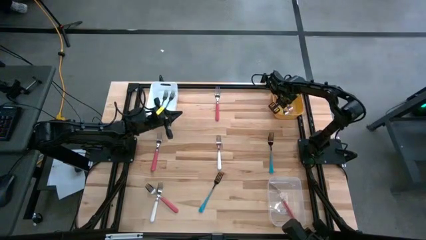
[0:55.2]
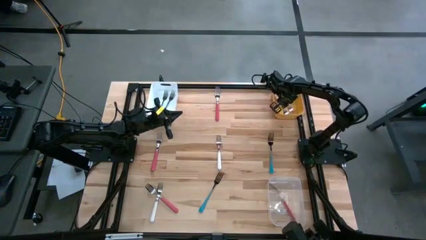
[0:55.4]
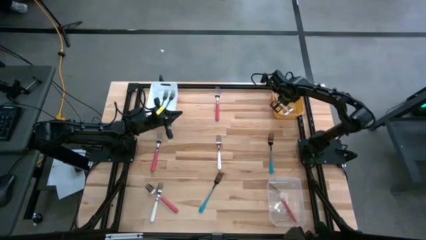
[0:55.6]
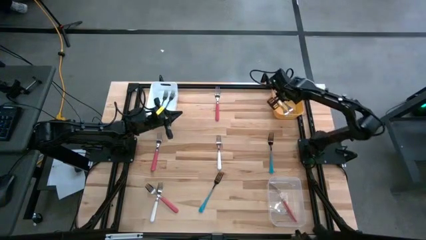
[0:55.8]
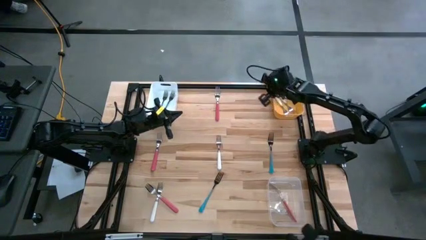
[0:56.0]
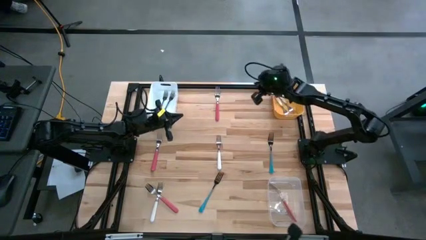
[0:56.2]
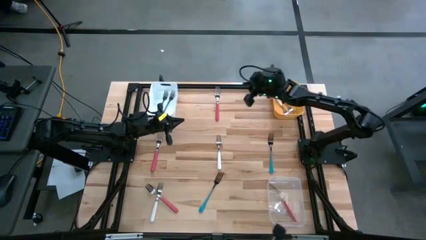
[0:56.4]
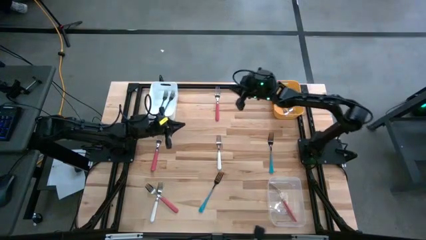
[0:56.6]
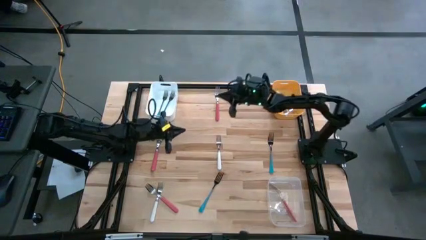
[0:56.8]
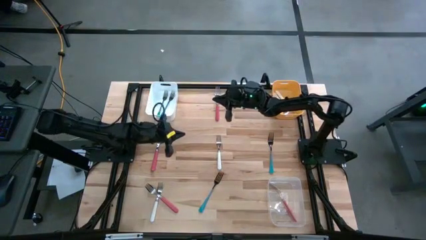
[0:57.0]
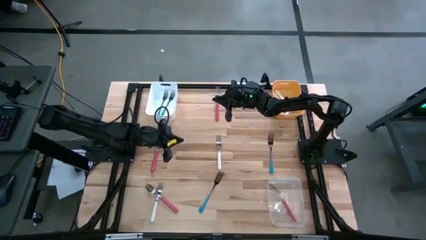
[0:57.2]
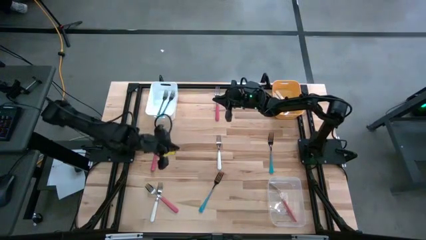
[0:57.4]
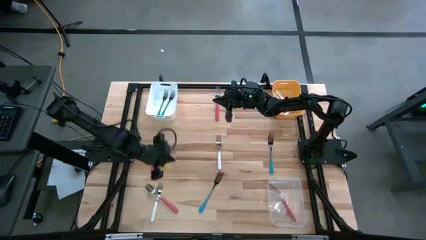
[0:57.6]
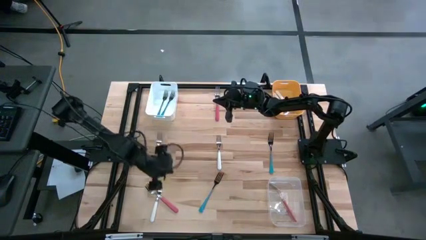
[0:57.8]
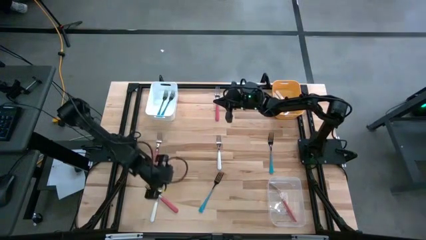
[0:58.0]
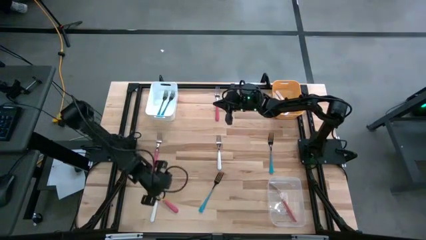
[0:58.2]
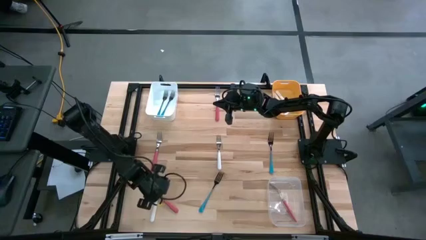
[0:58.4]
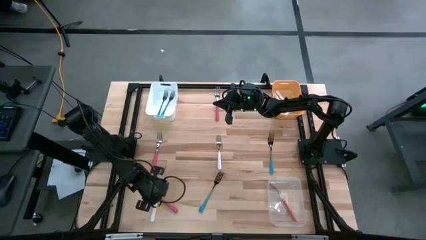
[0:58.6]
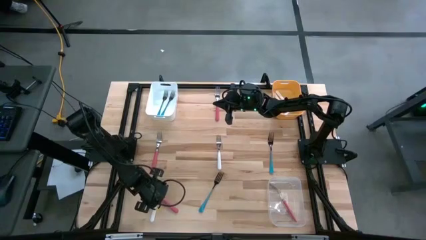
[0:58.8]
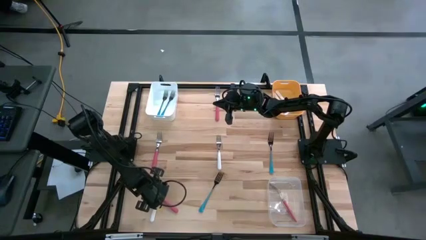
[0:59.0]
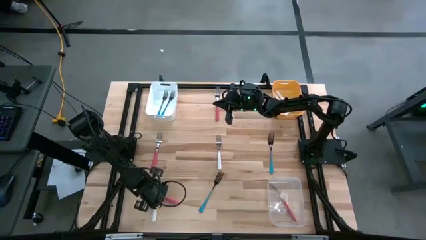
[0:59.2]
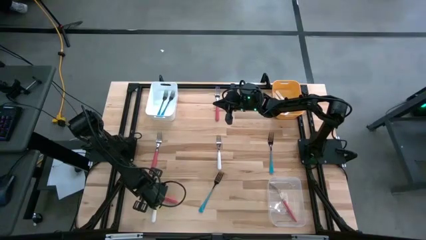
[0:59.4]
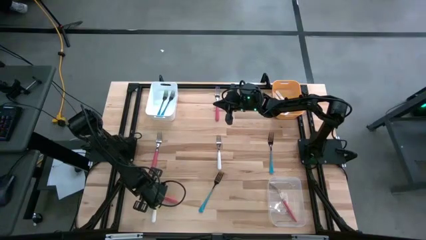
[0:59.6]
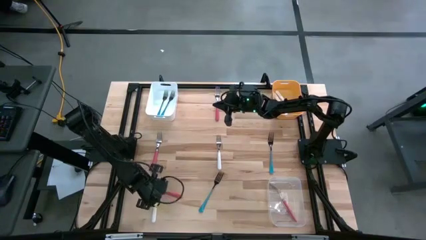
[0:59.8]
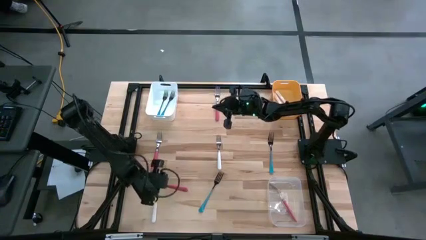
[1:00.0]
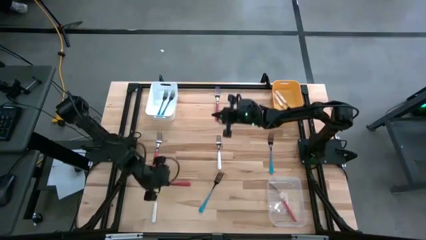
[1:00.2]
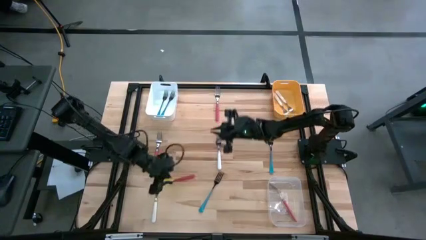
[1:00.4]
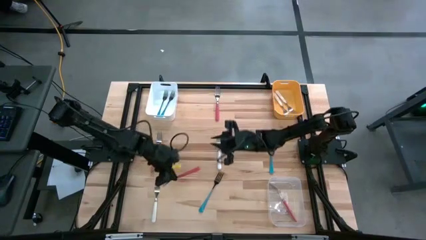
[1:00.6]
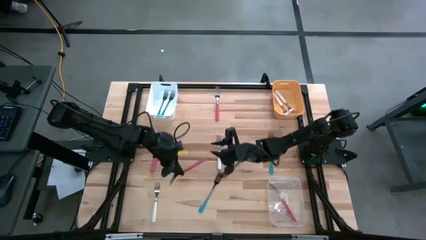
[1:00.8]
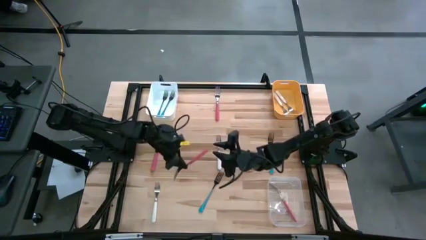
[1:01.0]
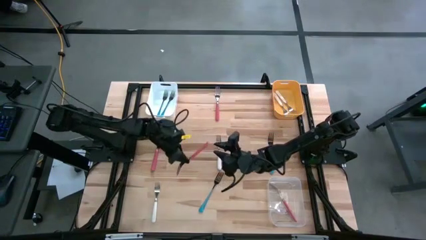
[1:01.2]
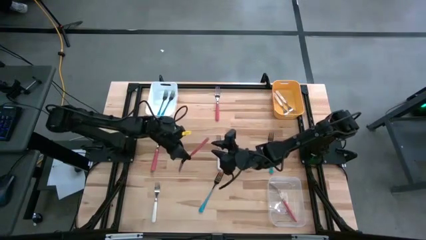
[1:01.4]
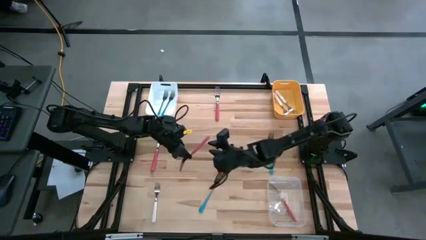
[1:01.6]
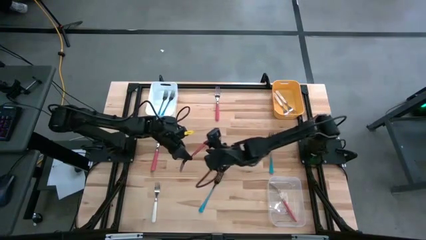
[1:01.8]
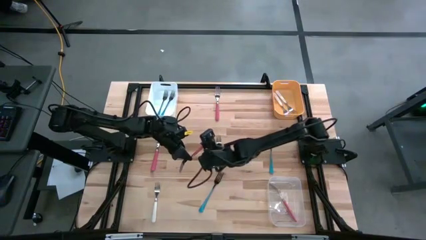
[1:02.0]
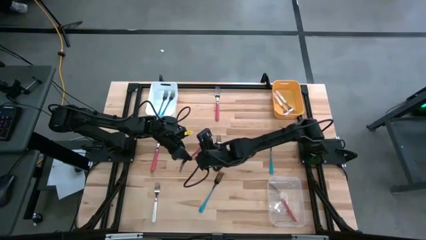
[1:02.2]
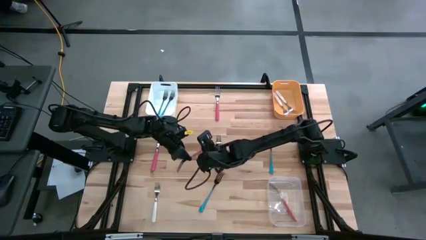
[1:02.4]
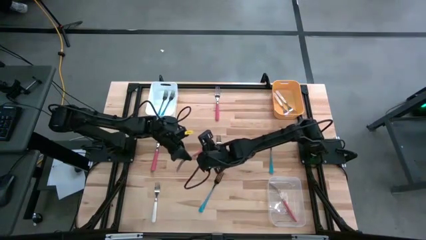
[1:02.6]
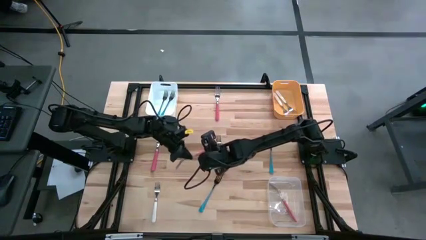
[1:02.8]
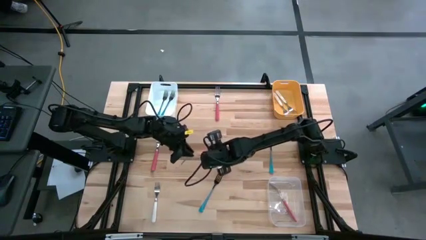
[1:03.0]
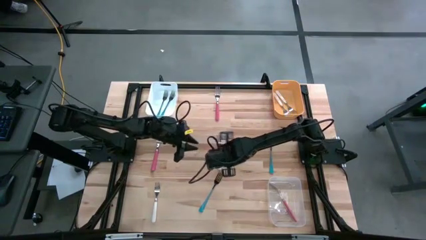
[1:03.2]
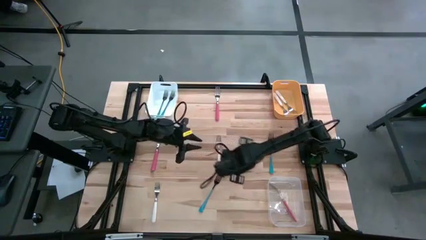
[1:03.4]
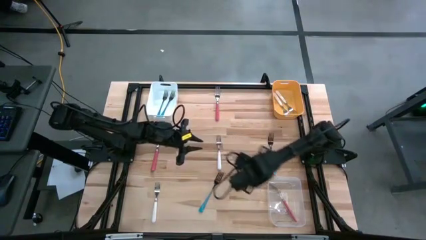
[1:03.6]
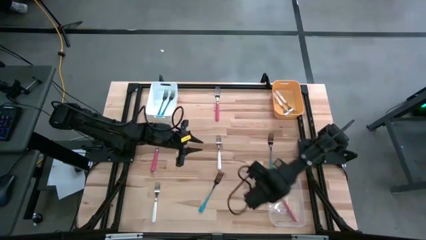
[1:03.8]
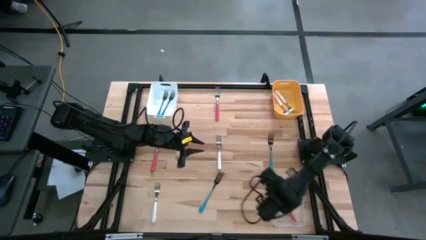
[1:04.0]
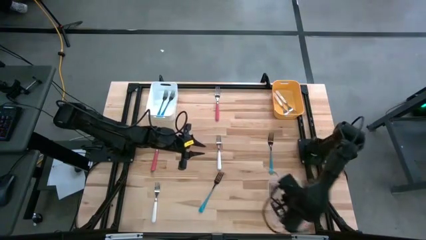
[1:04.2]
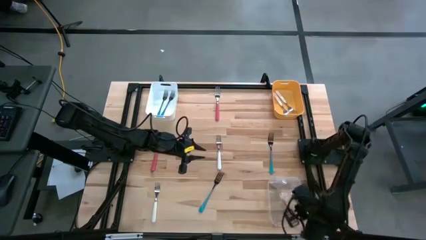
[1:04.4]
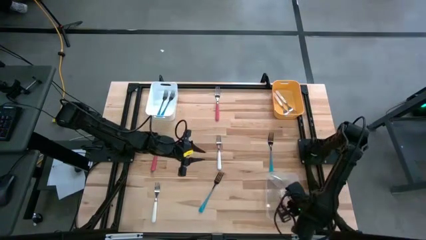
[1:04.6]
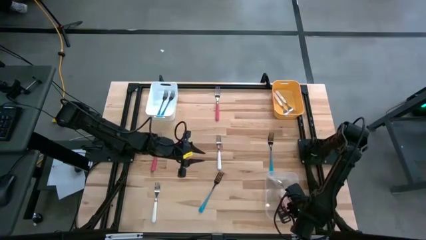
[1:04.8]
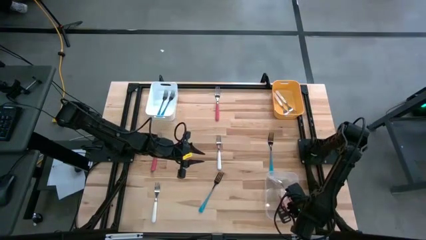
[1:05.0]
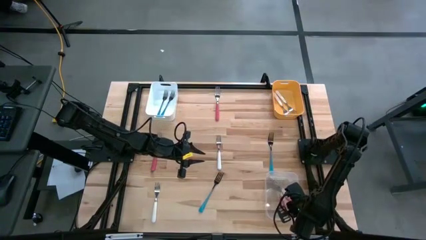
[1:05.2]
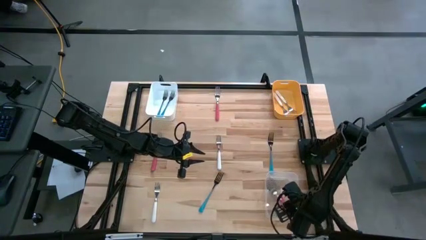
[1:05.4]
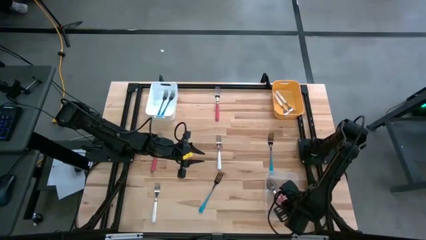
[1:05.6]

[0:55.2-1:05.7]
Task: Sort silverware by color (type)
Put the bottom left light red fork into the transparent bin

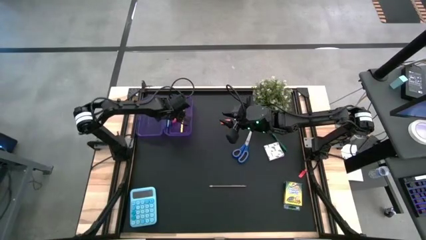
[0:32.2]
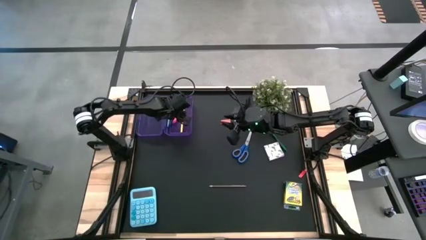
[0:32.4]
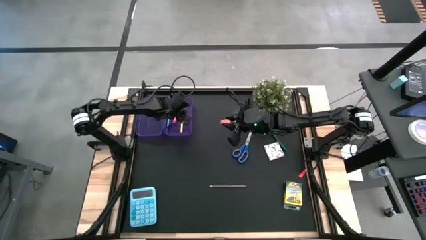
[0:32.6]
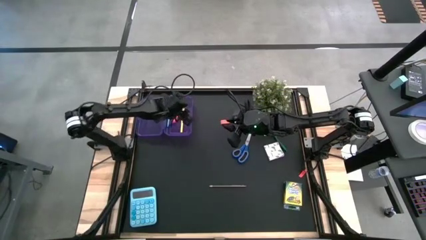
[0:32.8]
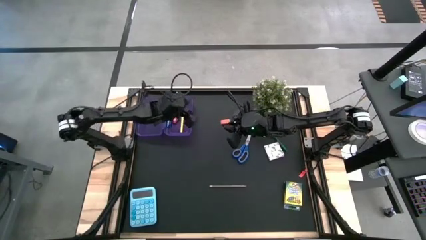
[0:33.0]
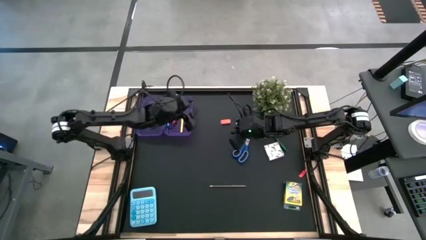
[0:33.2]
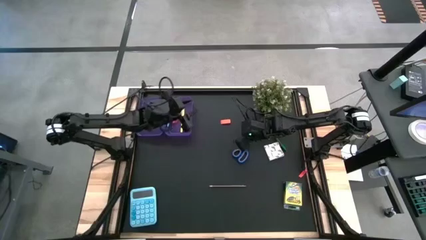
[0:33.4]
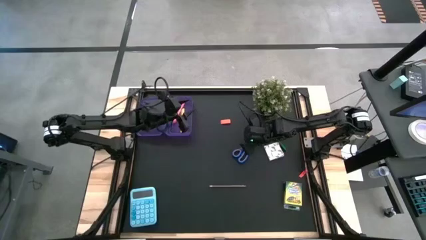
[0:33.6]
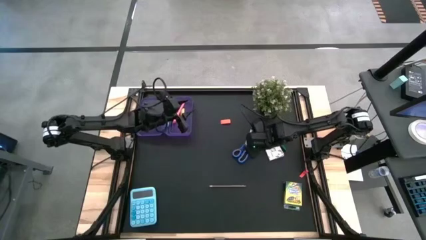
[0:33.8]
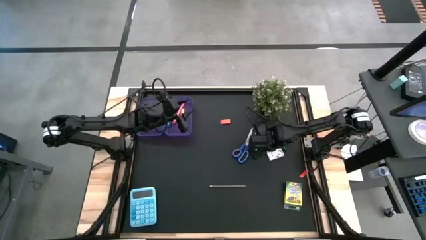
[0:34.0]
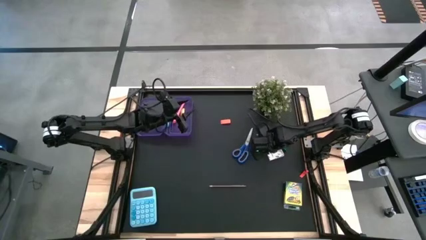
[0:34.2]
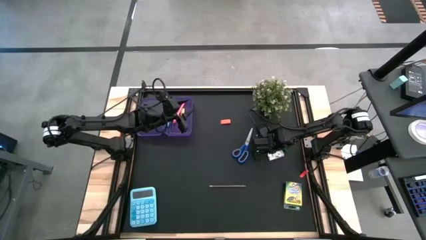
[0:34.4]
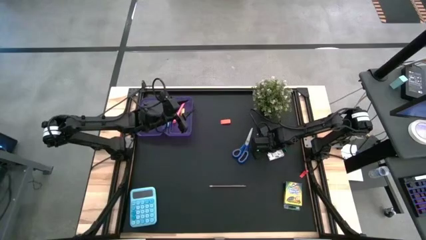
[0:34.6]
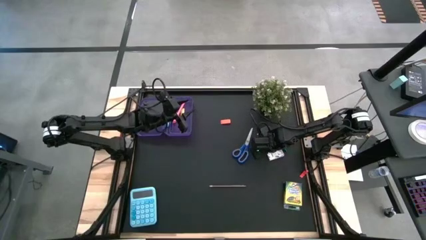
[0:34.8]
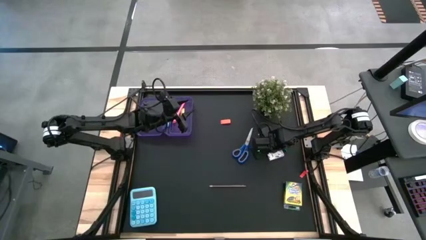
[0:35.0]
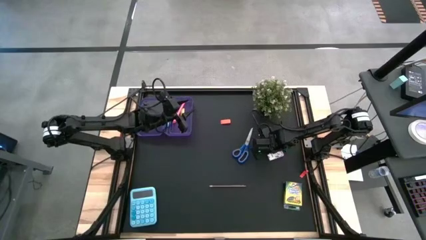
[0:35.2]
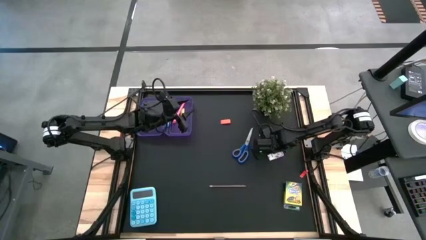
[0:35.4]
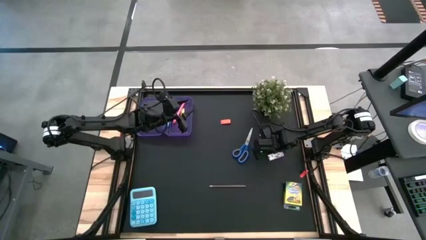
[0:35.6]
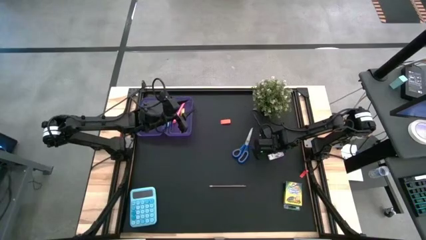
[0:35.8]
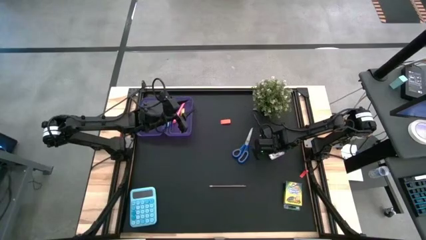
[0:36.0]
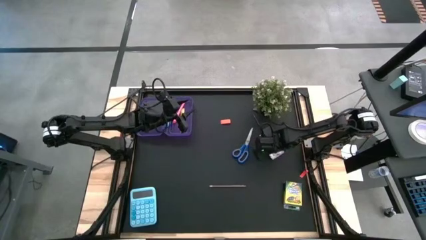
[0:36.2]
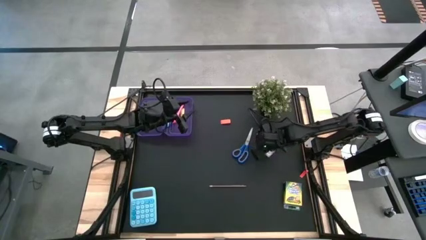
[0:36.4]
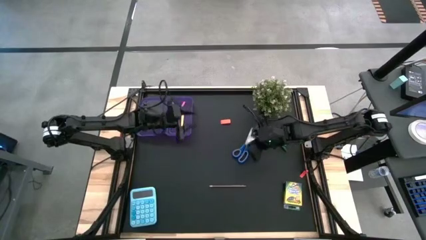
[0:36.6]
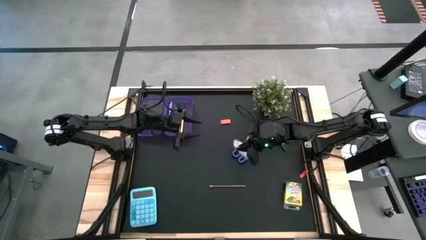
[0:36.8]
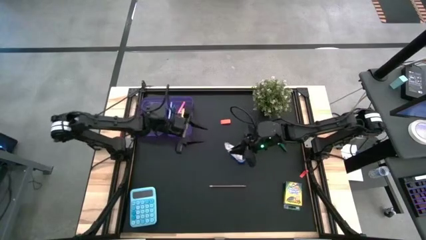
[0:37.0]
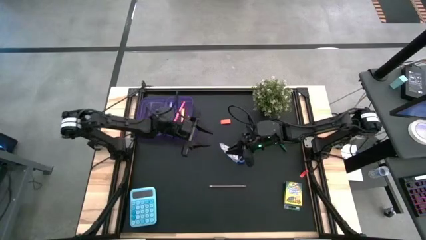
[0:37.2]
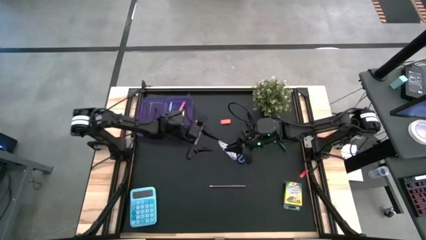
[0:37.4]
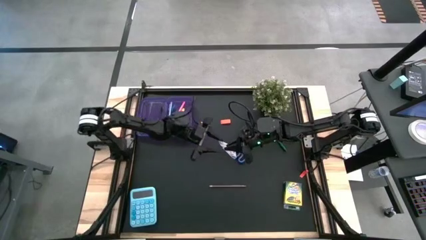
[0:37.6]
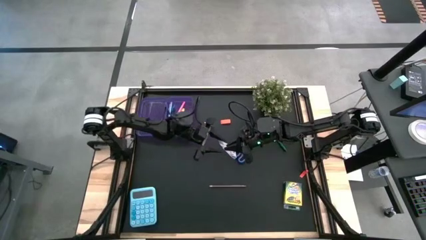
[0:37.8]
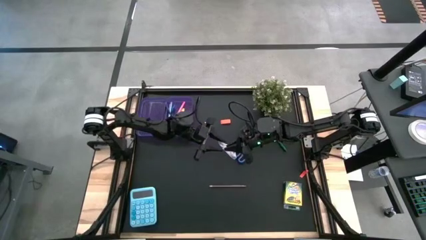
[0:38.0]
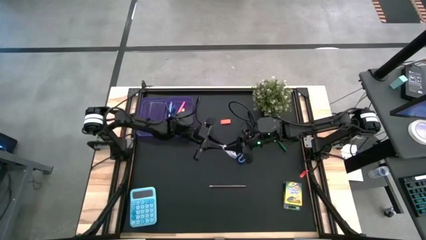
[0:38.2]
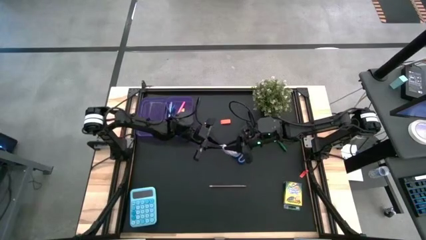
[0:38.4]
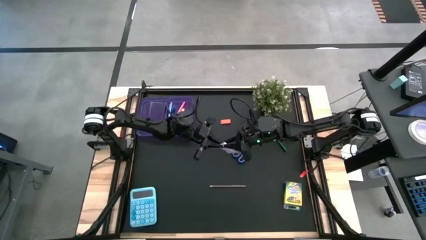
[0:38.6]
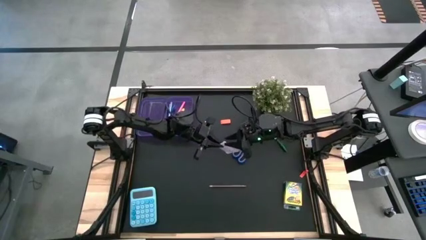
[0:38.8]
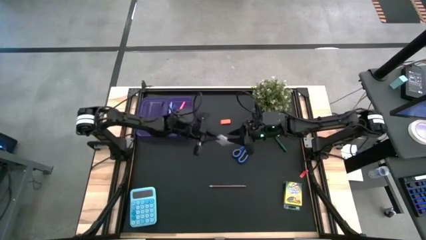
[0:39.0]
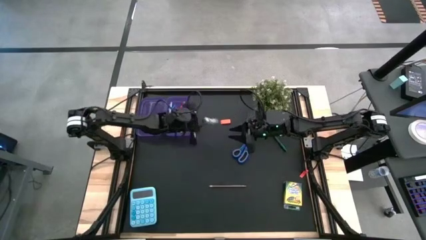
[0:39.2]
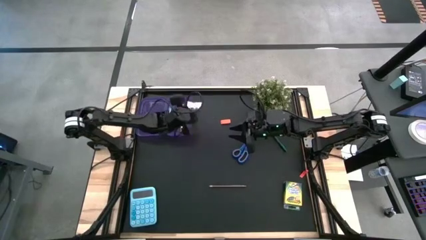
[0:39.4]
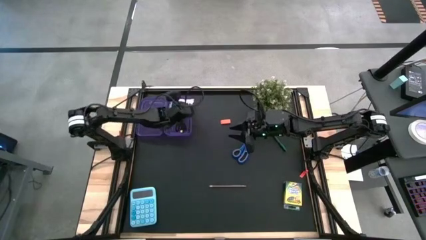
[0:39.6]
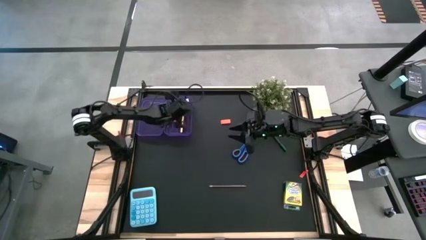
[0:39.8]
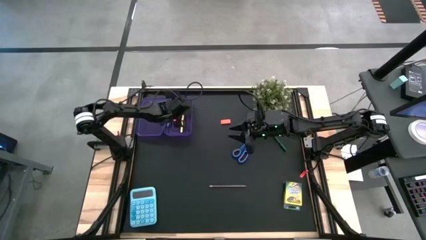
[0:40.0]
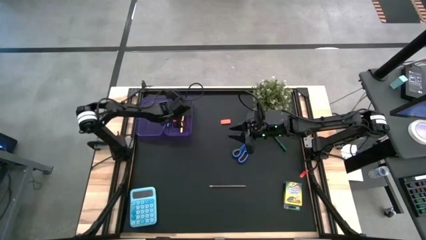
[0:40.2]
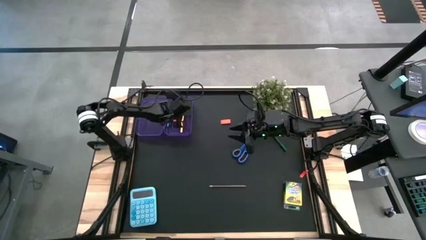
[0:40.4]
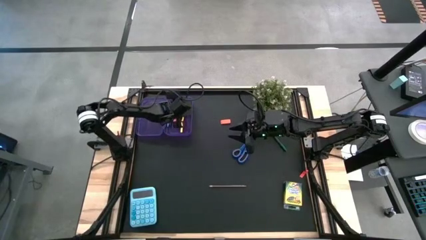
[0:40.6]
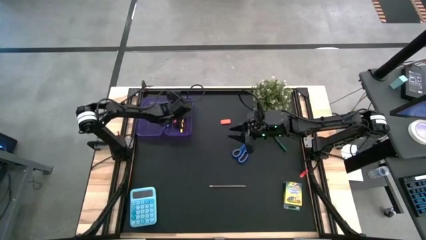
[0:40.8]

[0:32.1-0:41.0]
Task: Pack school essentials
Put the purple notes into the purple box
